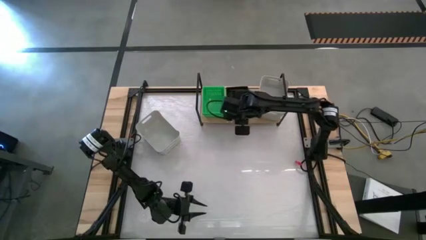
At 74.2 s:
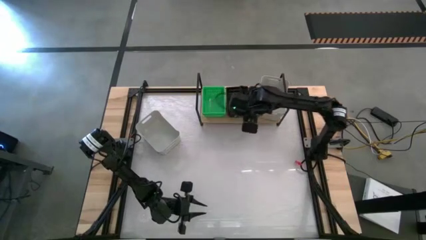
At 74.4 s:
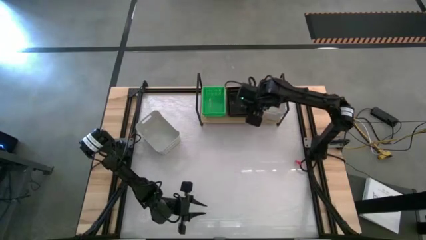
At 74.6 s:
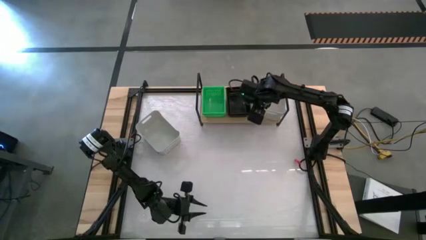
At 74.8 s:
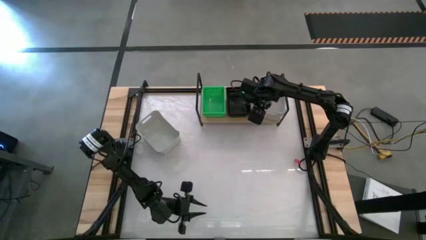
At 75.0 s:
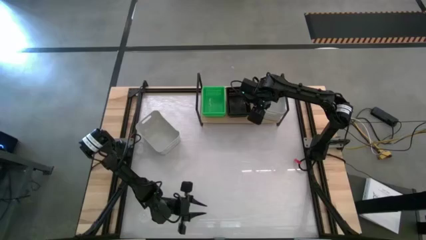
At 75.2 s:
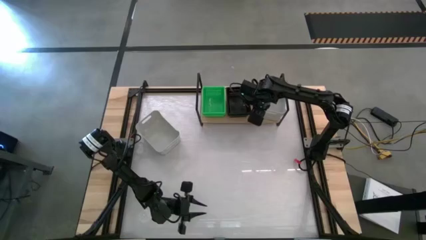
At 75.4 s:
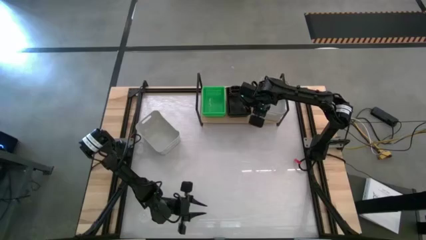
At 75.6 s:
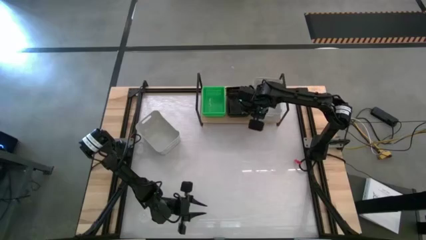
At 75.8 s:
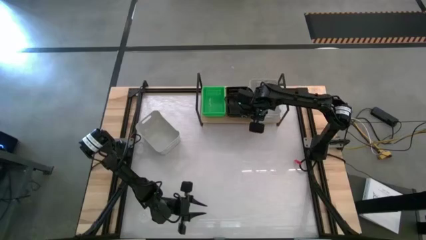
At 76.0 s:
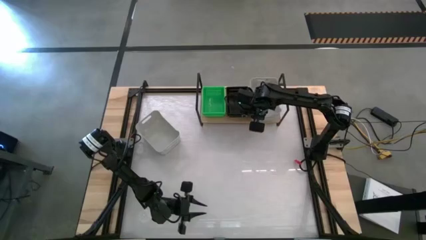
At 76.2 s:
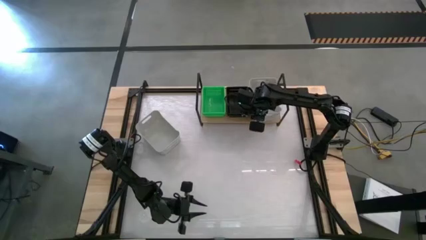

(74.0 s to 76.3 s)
Task: Stack baskets on shelf by color
Adjust the gray bins

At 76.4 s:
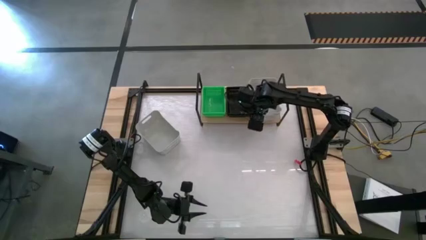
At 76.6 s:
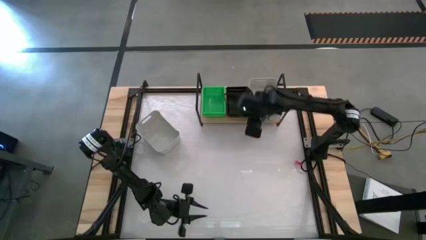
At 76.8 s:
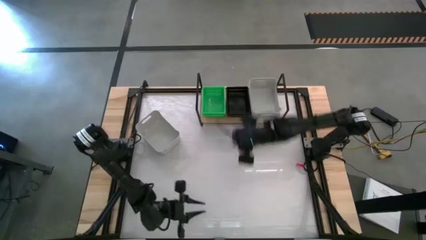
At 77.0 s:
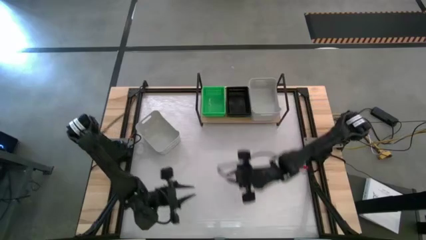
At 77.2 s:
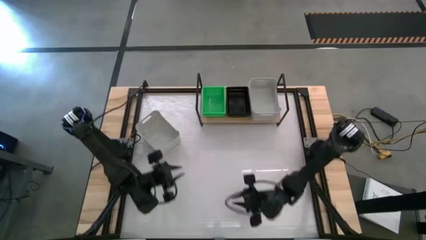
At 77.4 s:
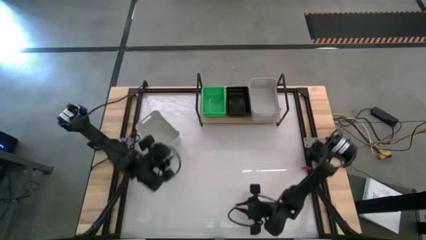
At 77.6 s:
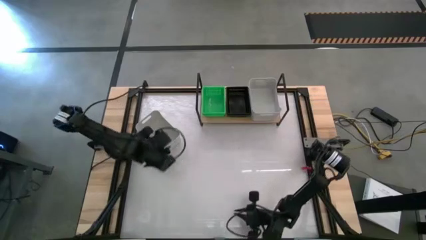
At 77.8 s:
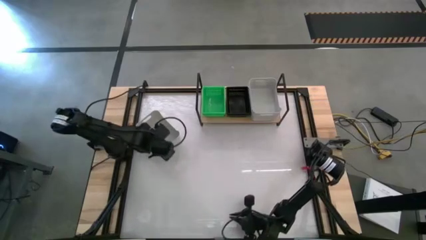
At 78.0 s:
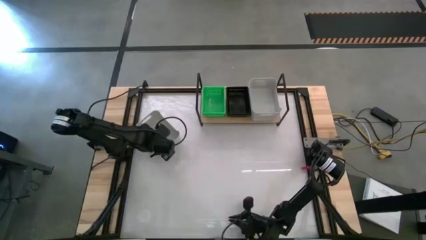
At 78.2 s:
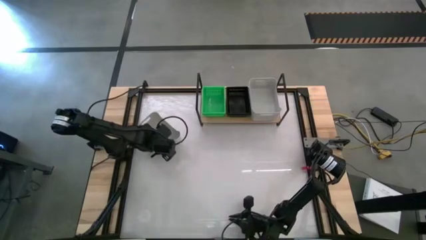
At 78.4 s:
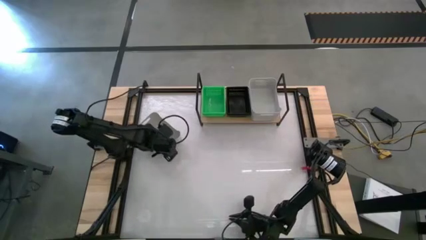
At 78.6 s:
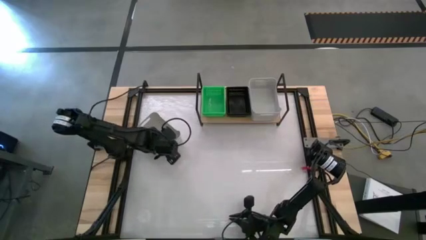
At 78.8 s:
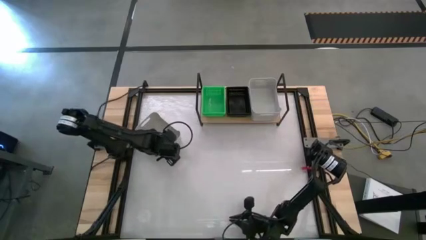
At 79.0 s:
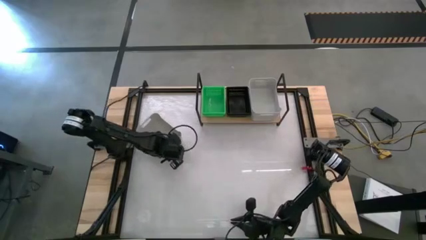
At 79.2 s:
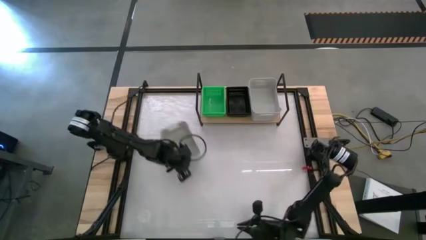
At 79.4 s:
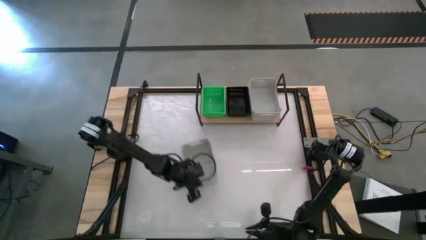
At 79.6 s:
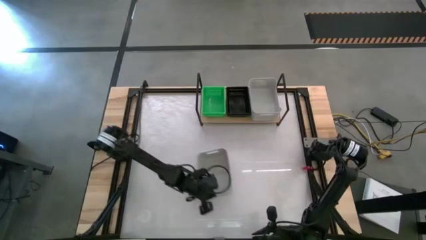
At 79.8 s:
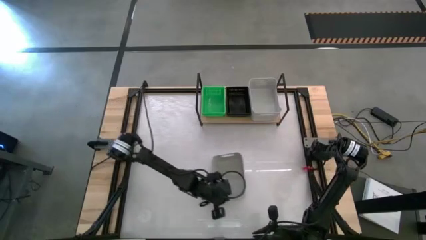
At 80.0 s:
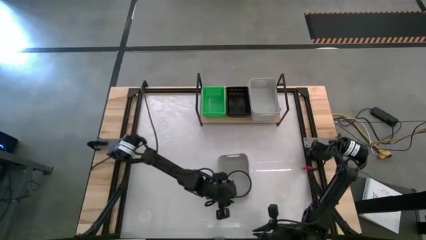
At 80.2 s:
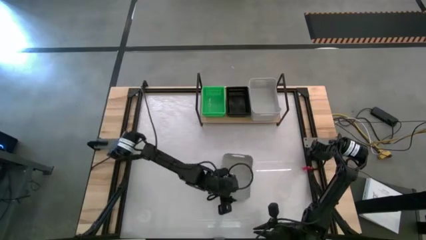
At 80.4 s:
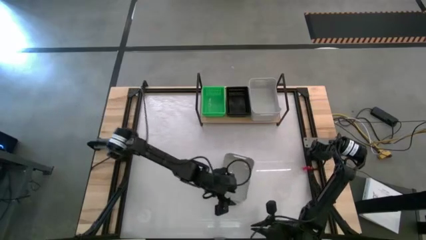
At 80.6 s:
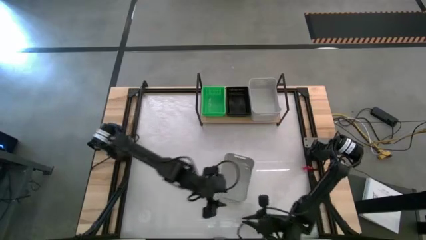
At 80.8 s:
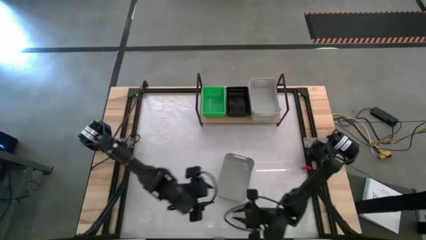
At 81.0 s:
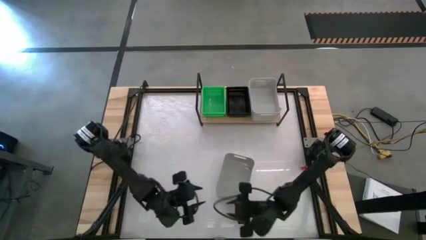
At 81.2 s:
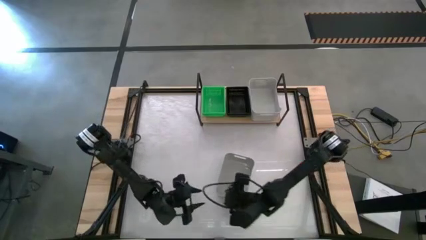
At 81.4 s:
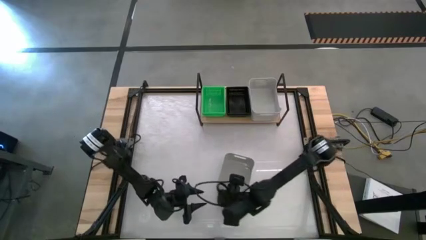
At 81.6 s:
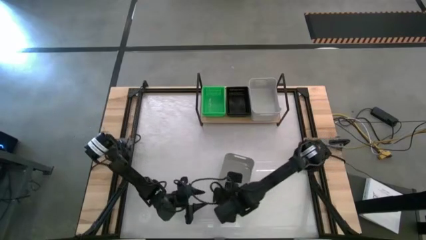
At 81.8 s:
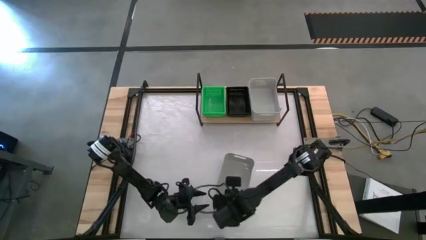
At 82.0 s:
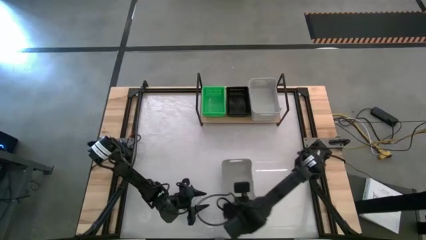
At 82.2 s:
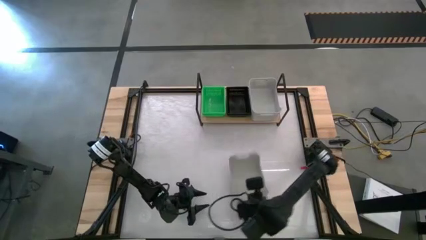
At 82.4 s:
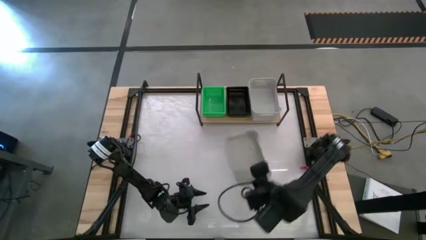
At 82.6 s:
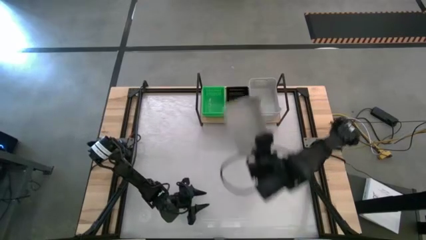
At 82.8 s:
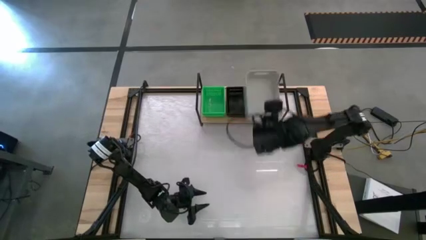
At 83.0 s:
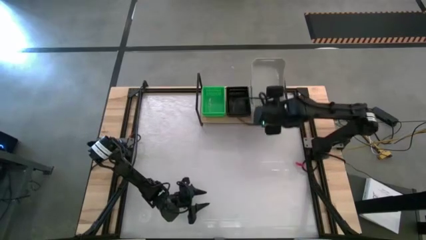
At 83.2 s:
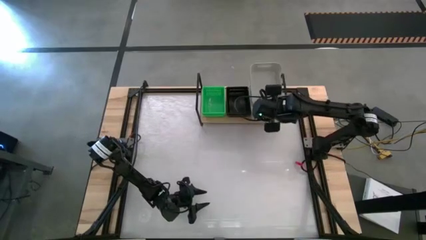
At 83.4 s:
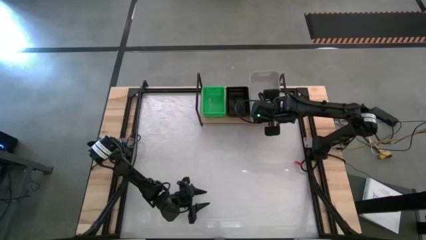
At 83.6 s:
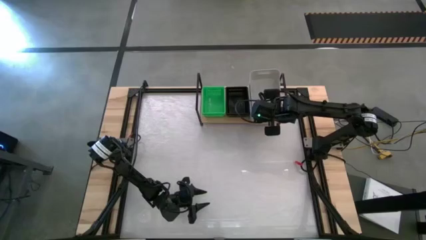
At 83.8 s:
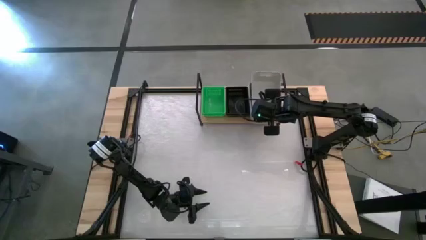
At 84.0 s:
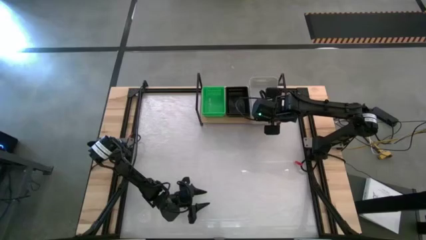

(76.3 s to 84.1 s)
Stack the gray bin on top of the other gray bin on the shelf

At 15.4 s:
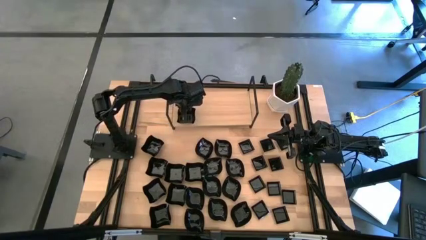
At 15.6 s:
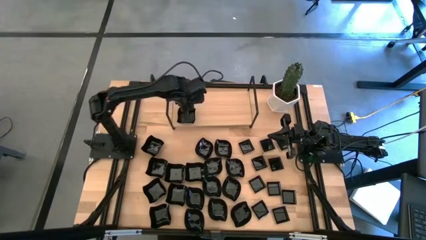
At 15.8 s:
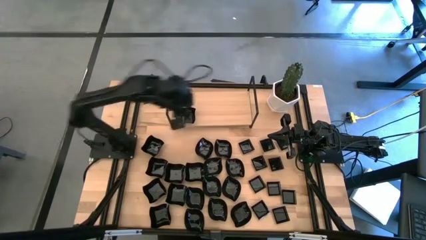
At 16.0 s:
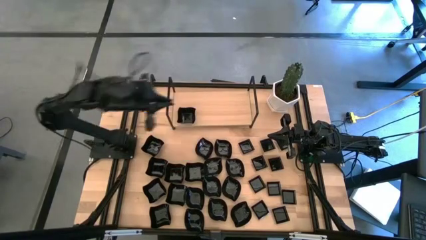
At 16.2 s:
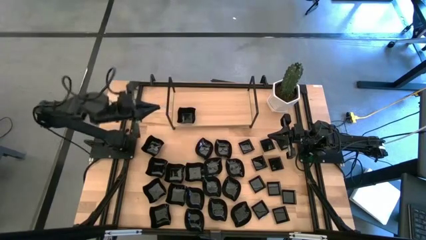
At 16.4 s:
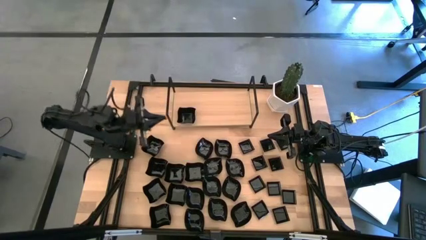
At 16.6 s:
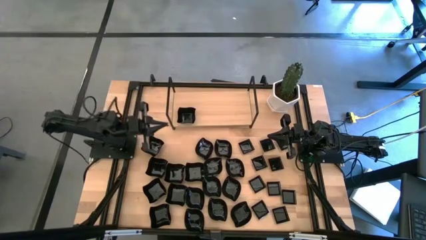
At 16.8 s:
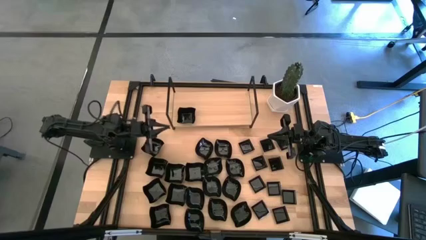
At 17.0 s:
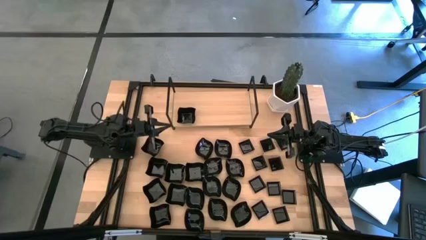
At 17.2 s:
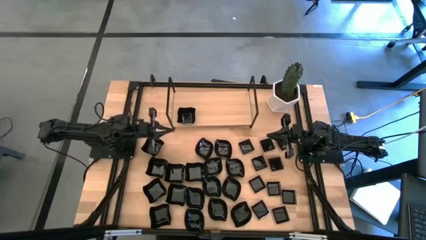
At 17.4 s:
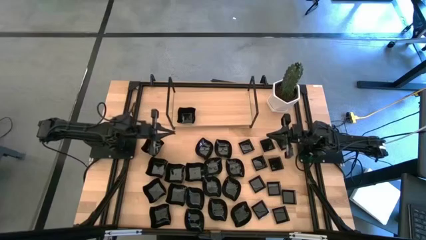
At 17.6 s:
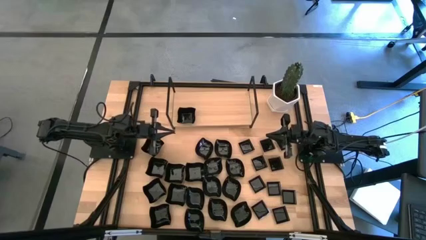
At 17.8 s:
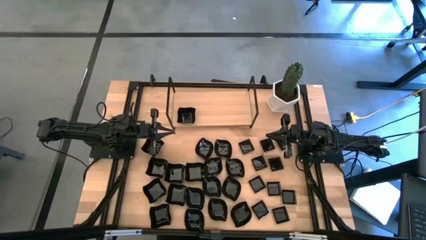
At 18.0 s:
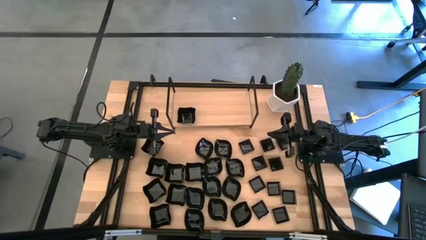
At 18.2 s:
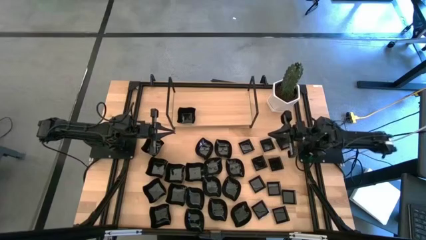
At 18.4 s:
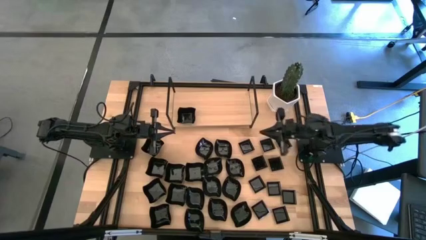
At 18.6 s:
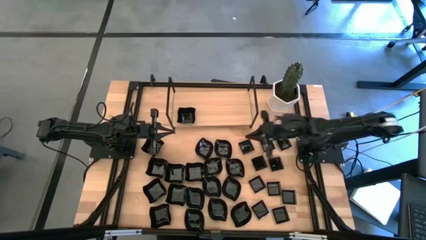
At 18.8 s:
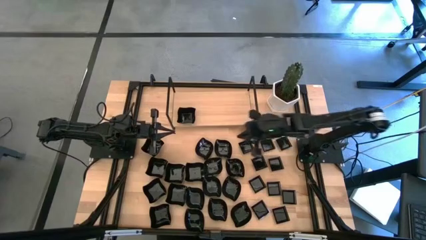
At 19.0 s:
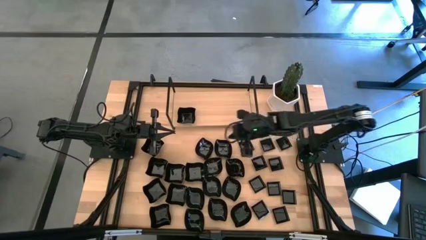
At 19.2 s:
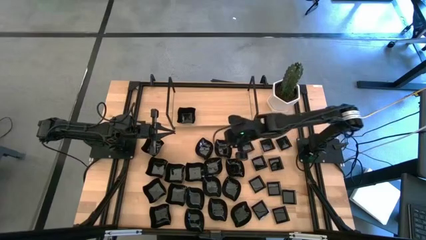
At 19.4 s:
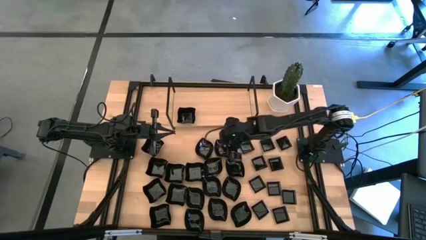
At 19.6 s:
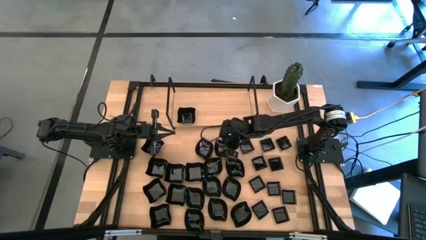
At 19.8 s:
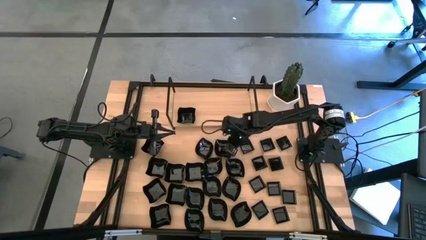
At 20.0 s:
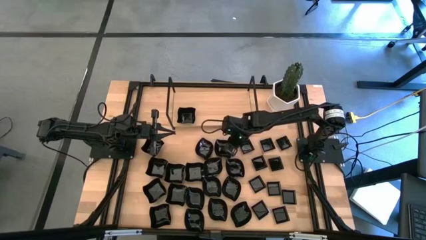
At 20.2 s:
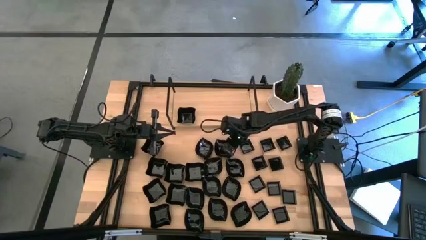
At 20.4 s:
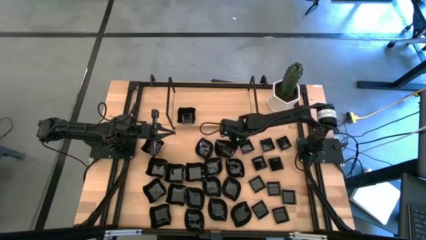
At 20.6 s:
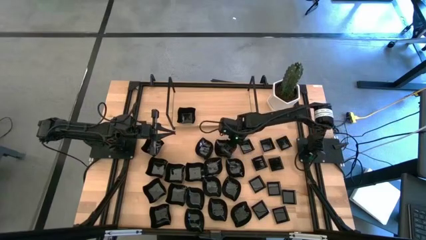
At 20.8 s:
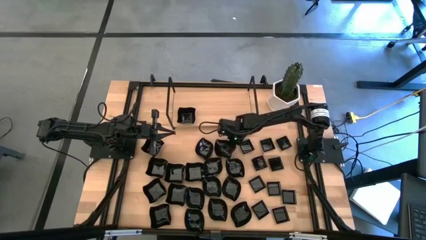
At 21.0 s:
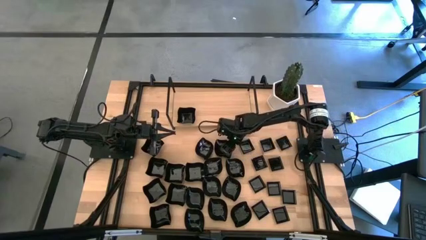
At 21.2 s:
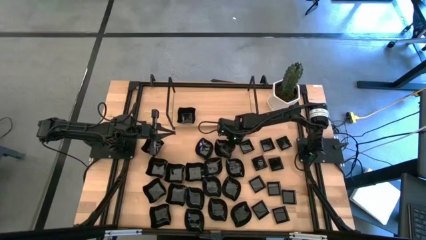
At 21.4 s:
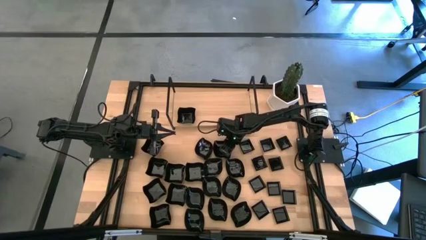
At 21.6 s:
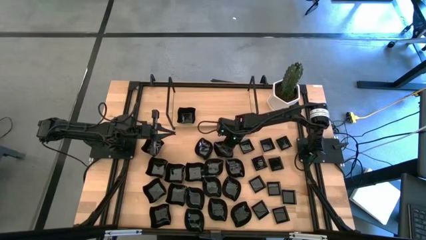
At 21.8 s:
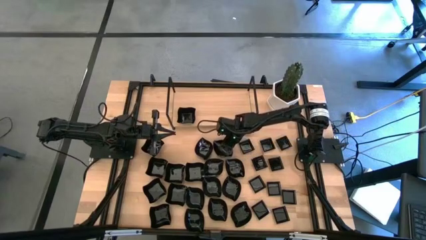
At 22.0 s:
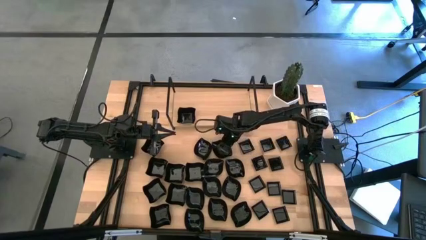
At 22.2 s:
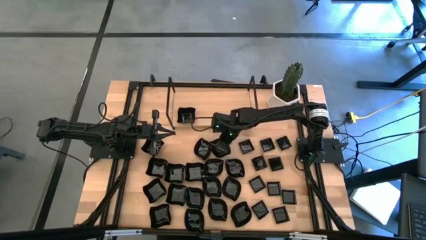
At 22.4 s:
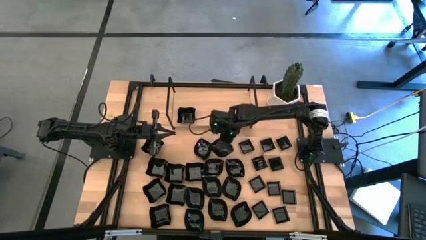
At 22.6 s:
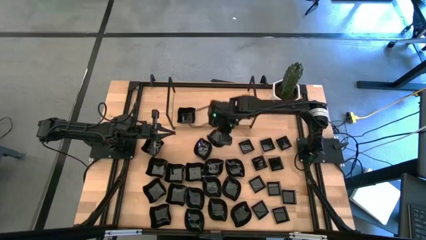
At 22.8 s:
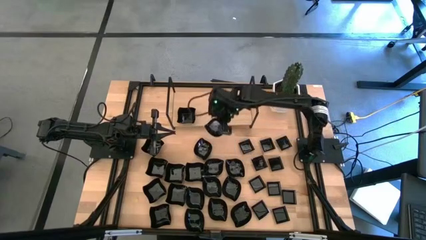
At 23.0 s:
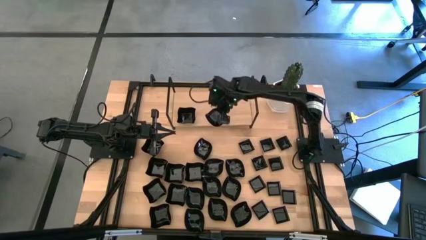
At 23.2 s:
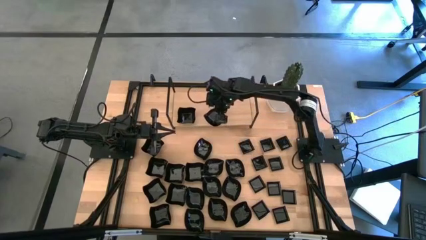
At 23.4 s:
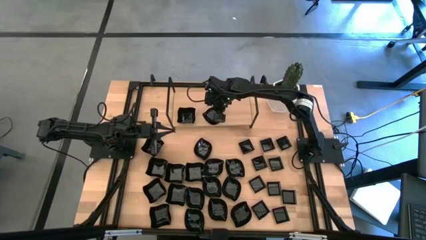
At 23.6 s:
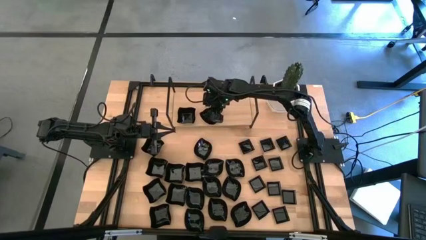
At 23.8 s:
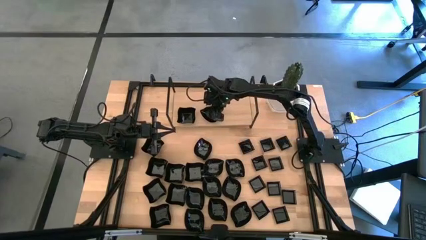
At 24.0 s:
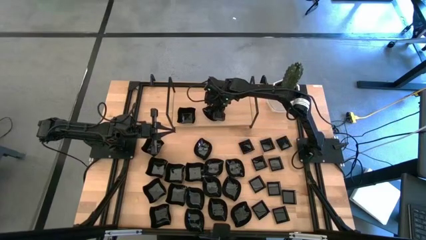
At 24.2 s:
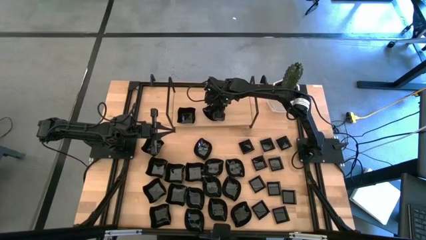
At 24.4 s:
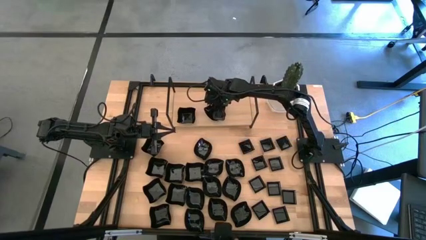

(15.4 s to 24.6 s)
Task: Pick & Place Mini shaped plates
Put the black leaf-shaped plate on the shelf
